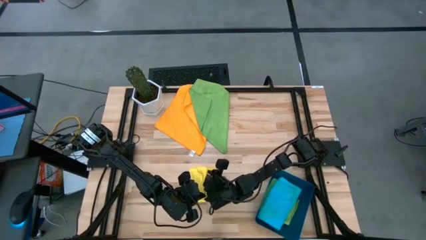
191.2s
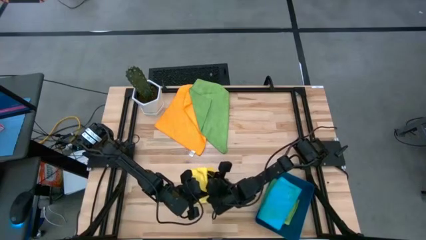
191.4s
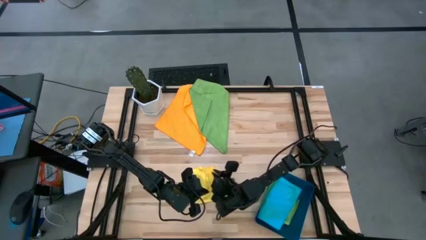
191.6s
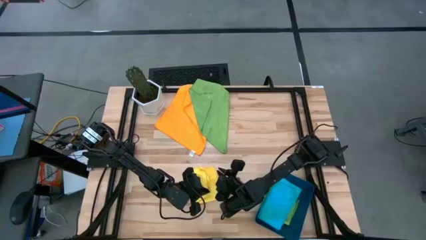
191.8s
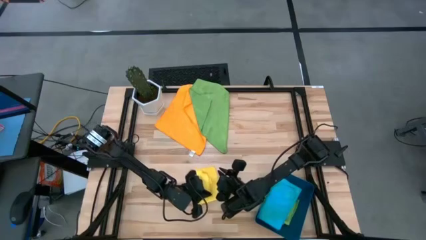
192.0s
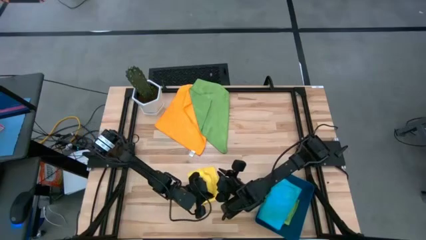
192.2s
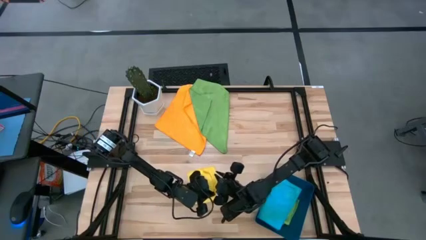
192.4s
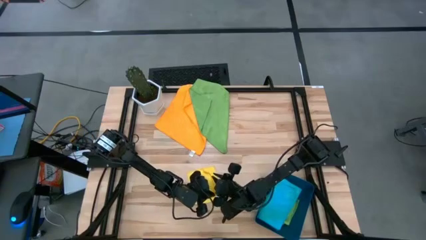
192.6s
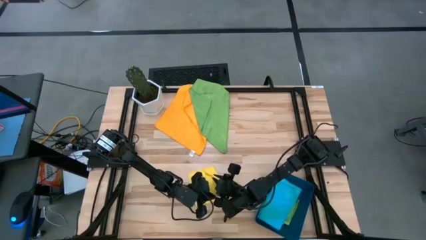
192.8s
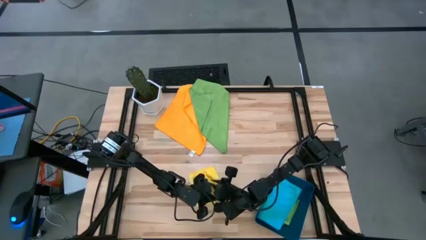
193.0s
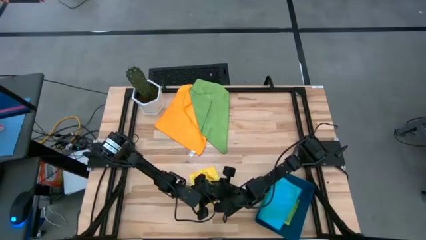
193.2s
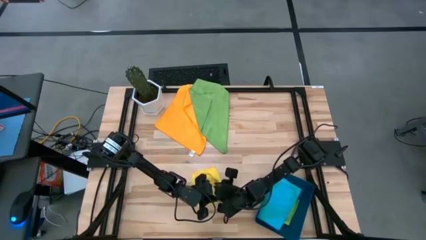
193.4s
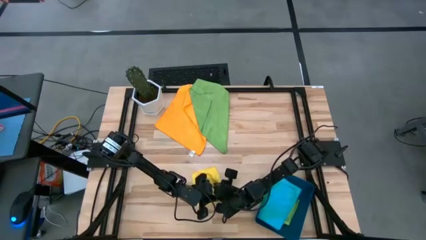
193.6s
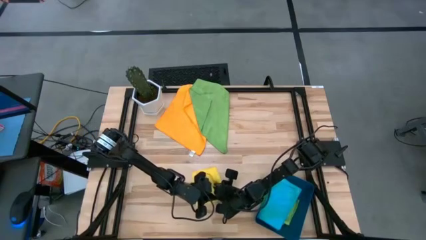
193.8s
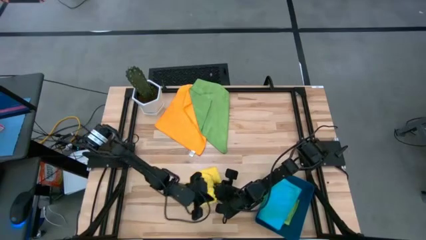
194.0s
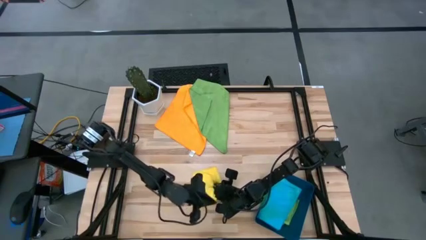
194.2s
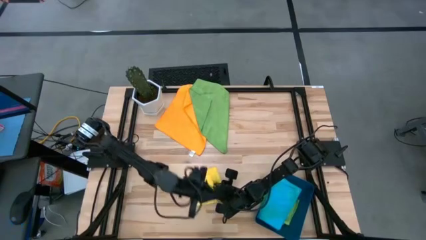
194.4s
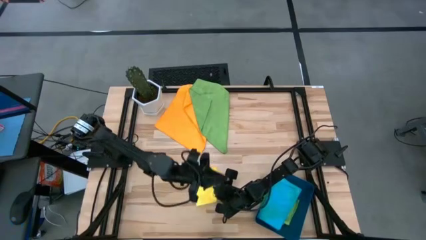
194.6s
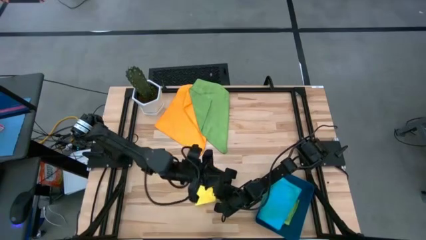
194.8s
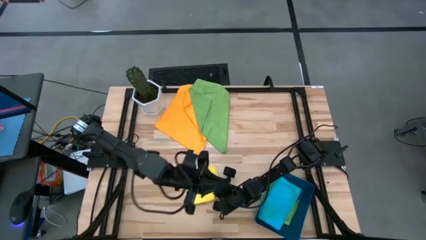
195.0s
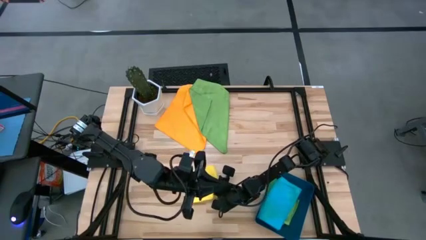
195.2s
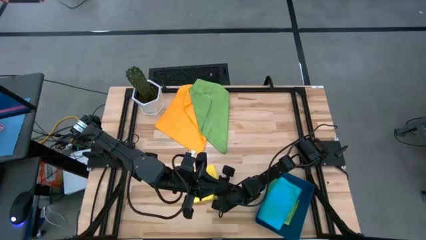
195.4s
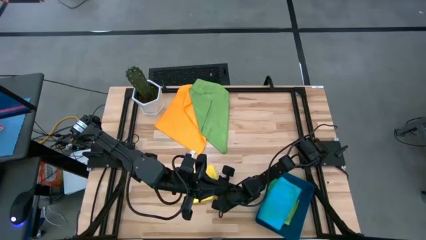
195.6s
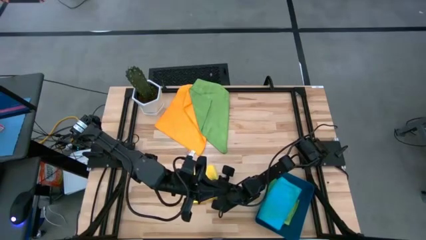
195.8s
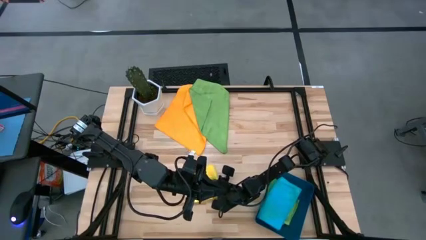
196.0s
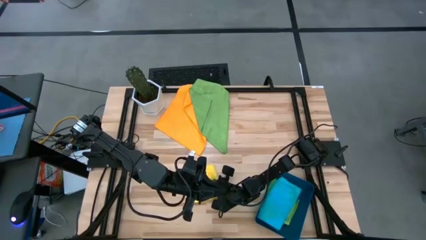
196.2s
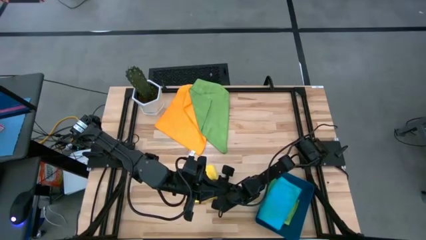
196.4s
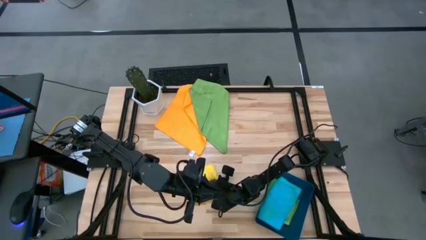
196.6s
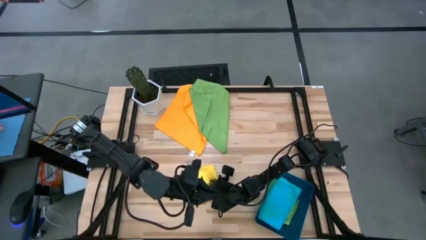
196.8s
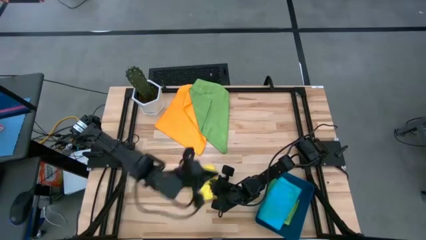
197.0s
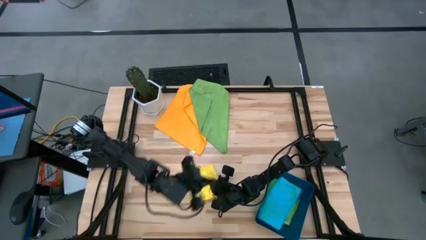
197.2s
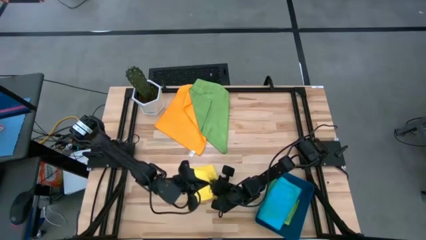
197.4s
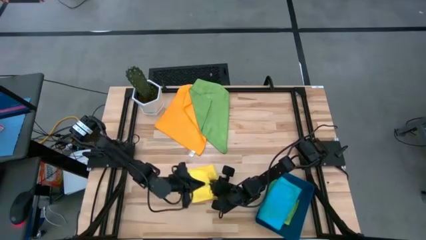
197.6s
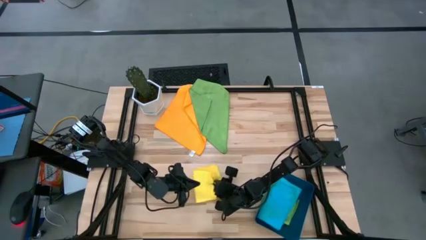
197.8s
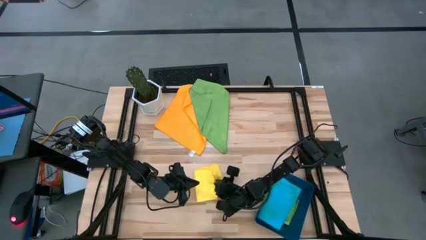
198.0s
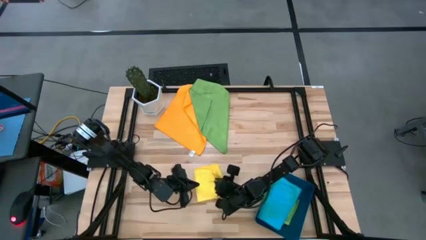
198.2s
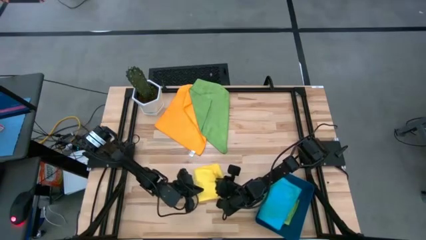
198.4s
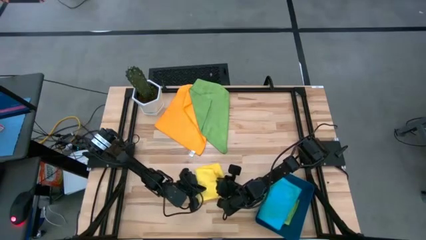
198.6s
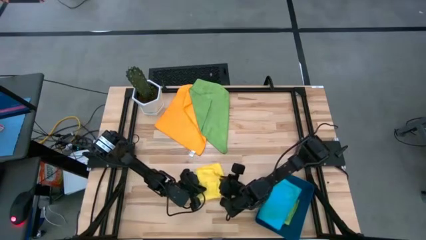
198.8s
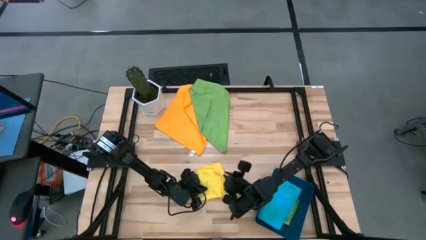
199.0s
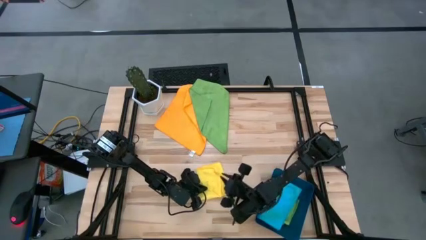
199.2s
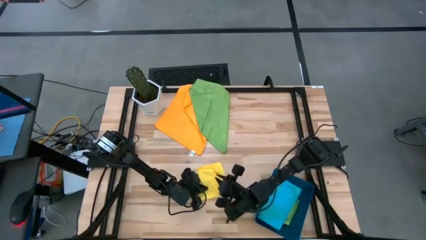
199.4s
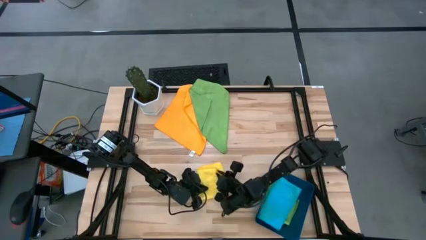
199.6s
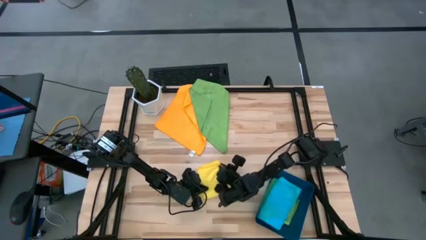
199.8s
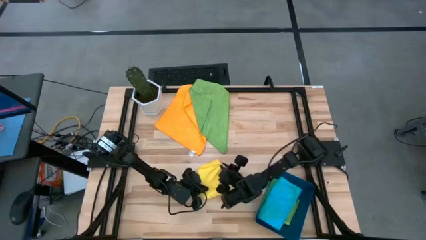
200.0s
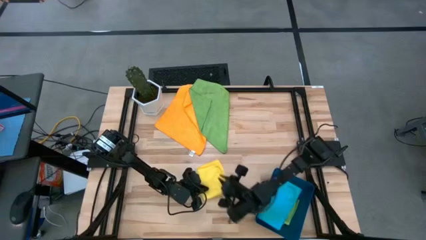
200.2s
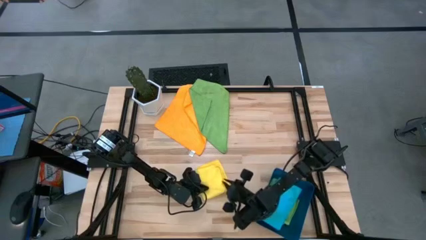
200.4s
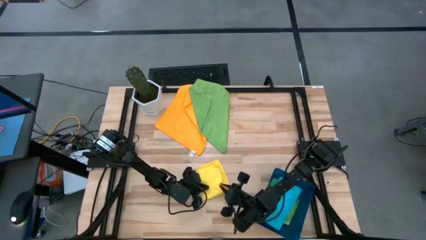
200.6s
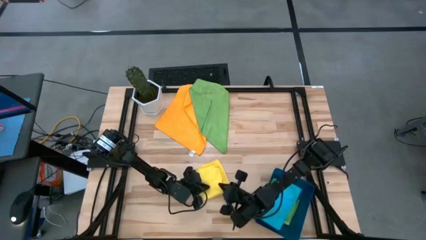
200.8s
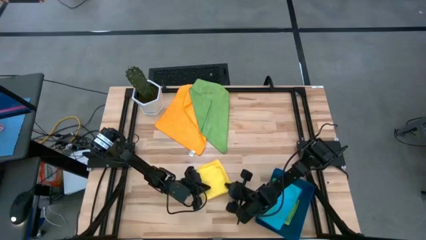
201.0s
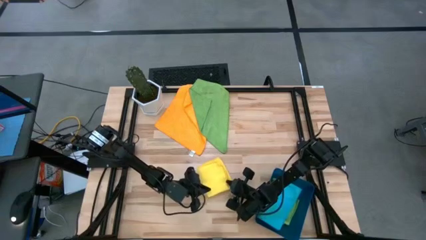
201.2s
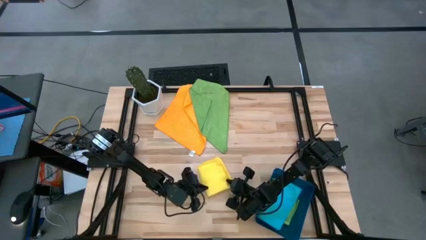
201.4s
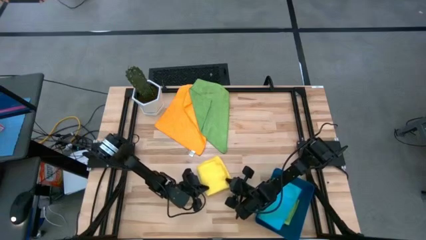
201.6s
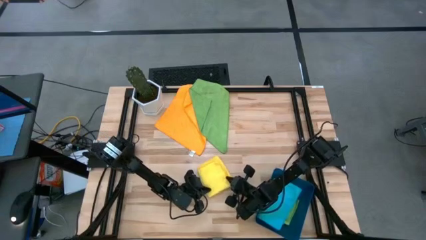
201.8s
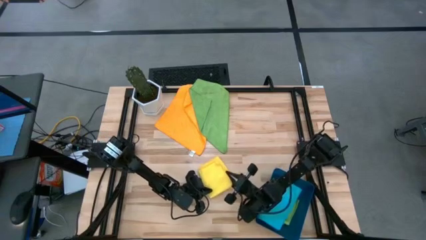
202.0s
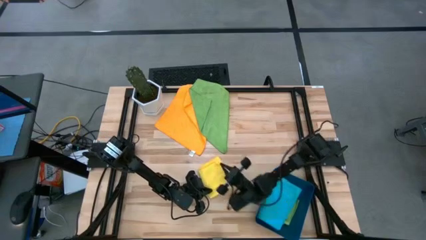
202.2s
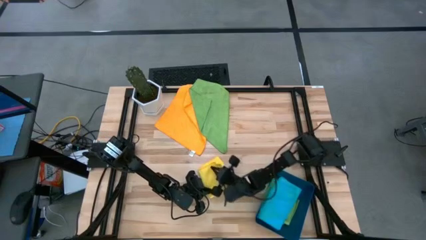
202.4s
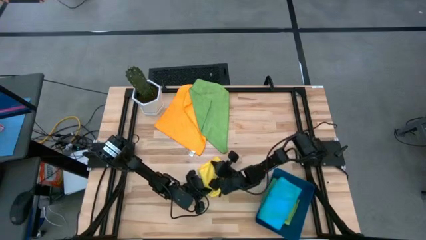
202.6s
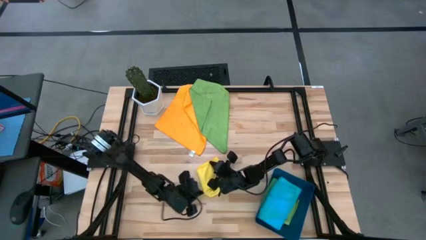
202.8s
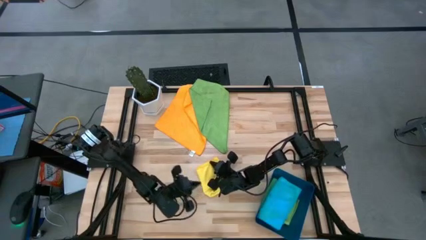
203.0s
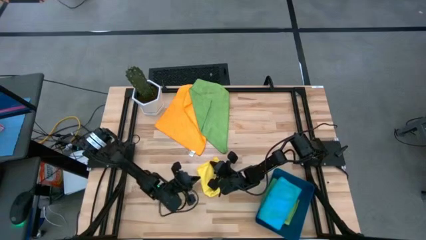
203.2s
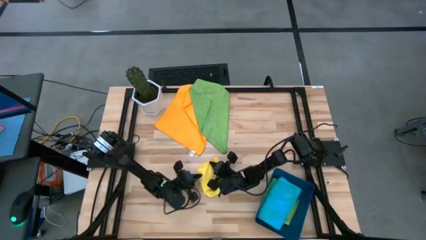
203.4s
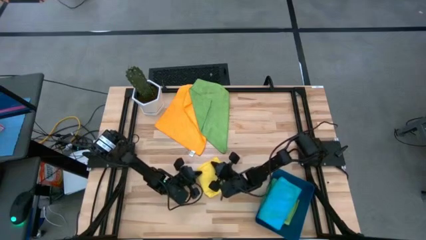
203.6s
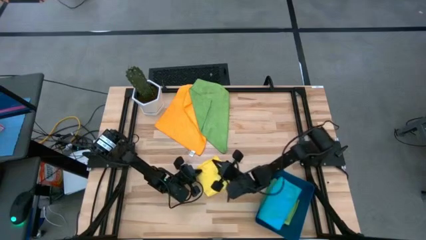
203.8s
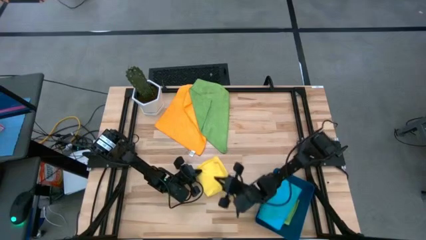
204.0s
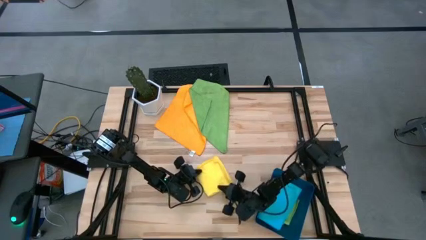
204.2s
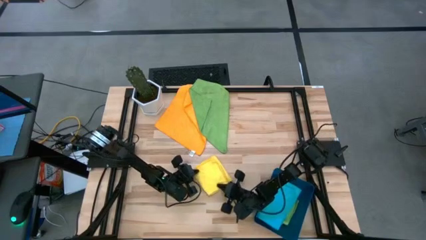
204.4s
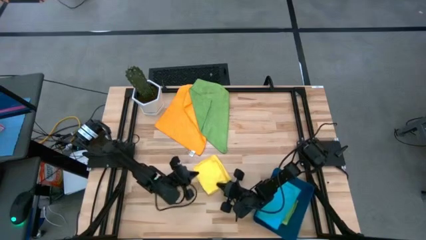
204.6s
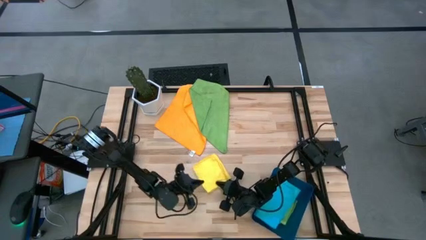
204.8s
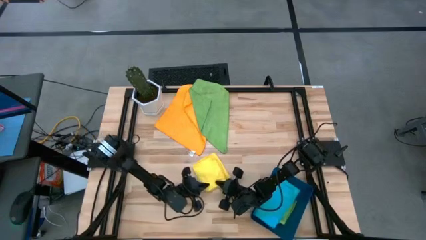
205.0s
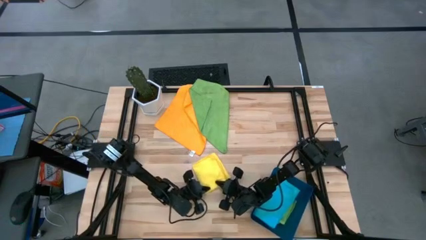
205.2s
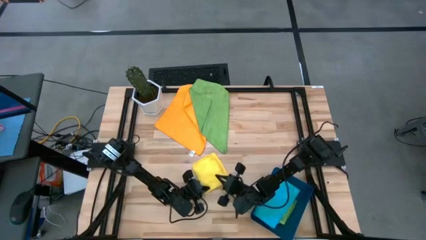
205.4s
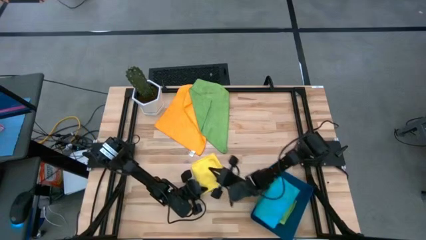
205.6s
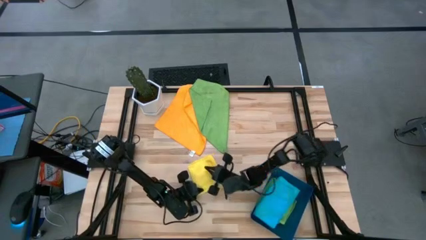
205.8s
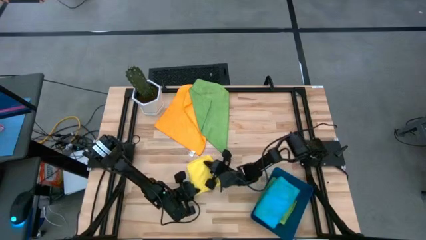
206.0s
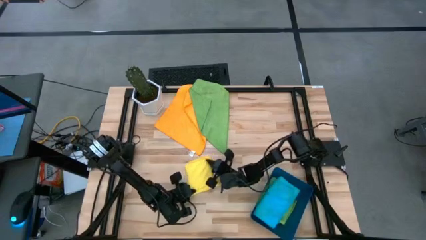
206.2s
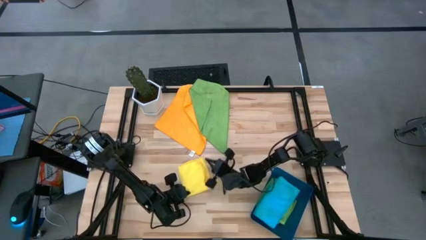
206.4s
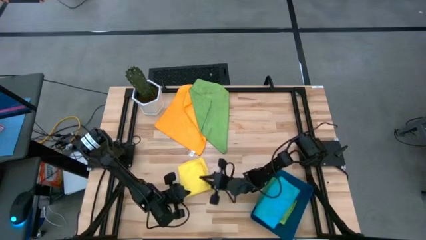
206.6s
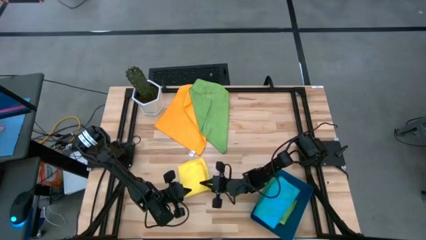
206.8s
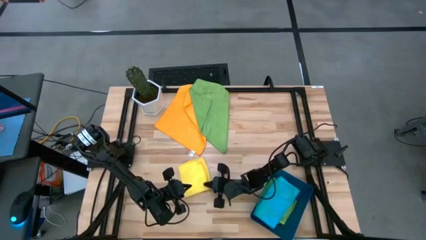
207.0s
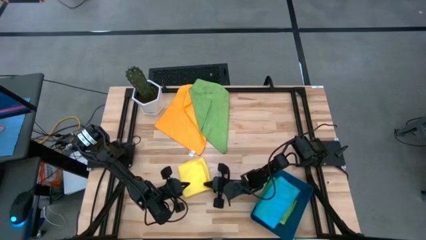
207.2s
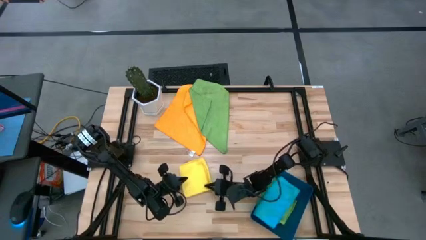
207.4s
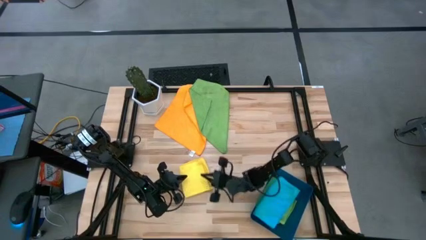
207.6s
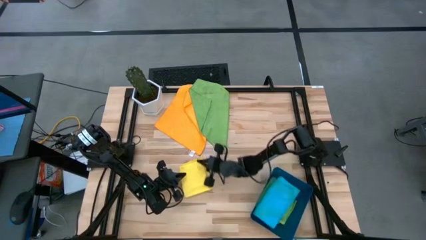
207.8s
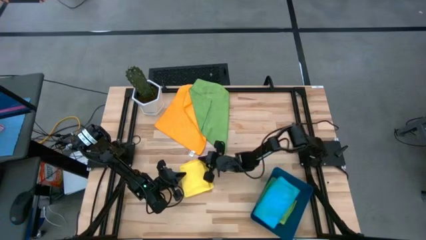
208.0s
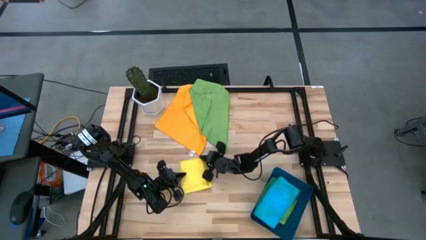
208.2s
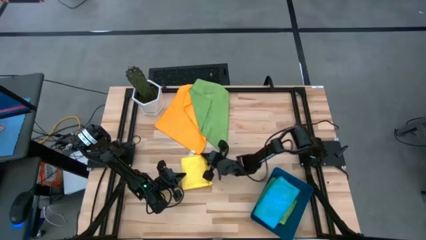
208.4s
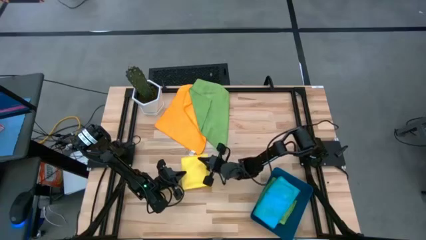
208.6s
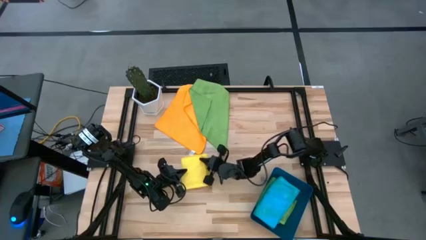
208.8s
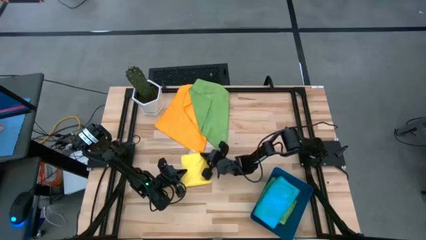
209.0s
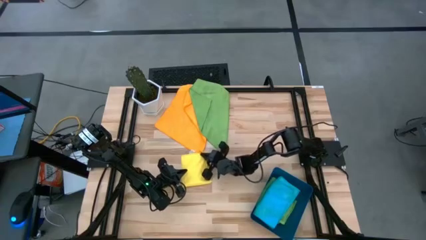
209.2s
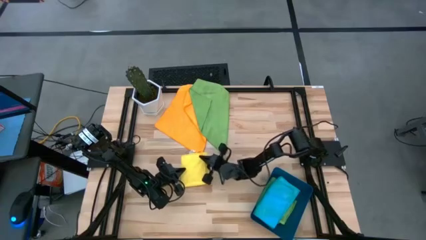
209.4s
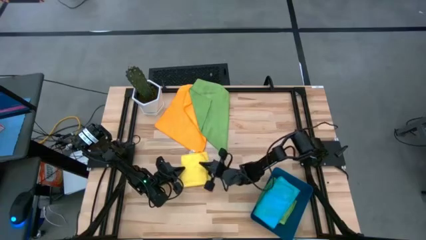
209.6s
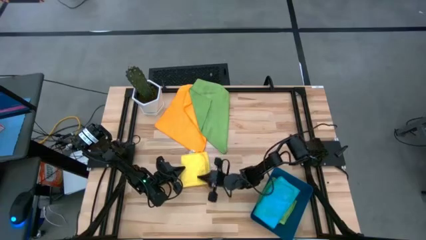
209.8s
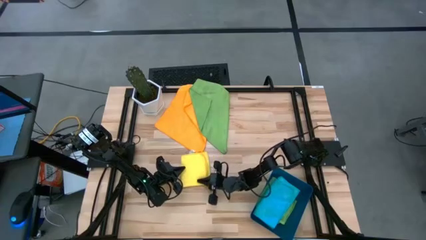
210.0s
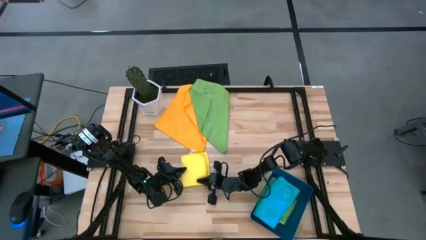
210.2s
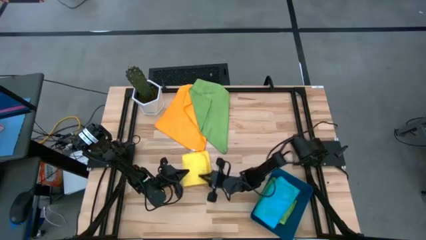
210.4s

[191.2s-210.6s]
Task: Fold microfiber towels
Fold the yellow microfiber towel
